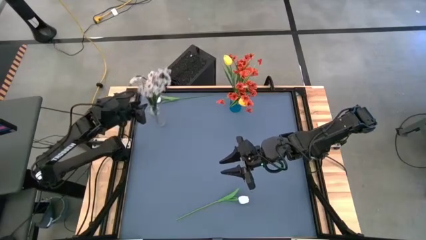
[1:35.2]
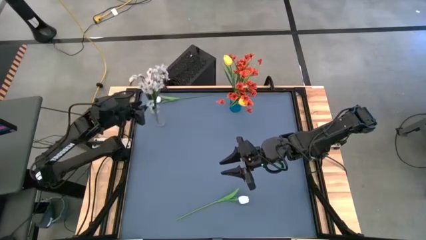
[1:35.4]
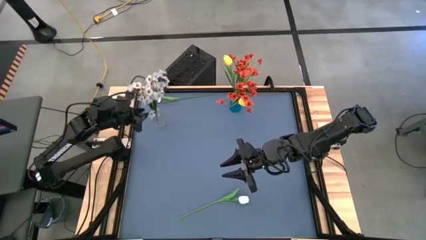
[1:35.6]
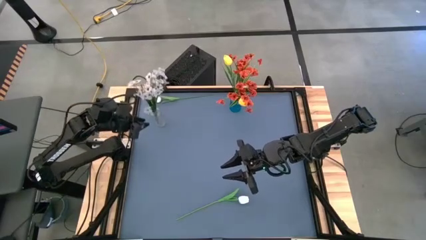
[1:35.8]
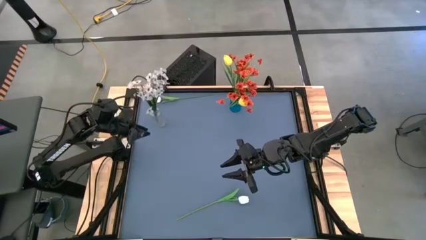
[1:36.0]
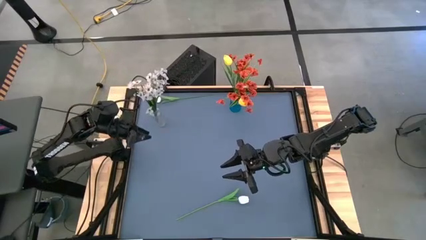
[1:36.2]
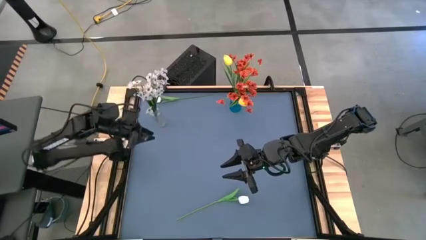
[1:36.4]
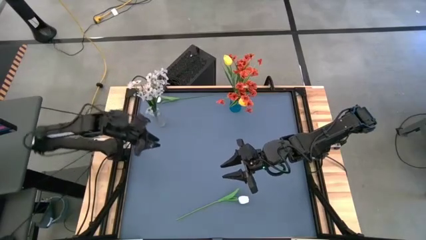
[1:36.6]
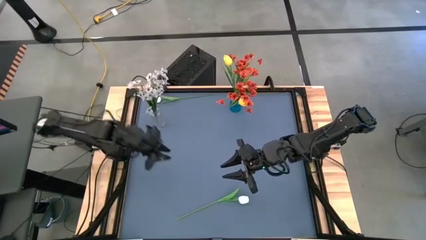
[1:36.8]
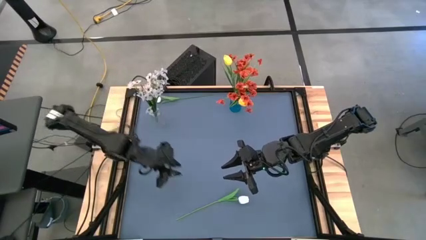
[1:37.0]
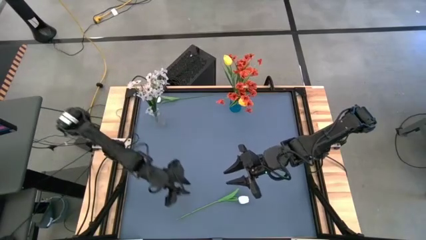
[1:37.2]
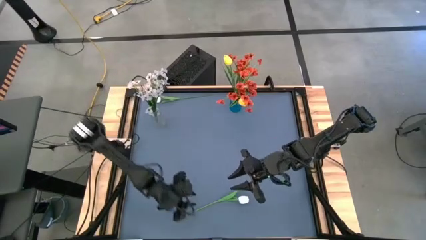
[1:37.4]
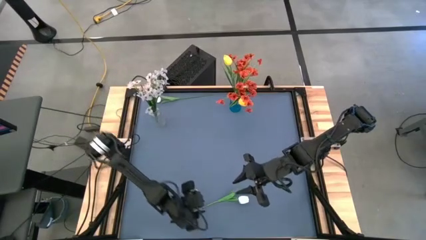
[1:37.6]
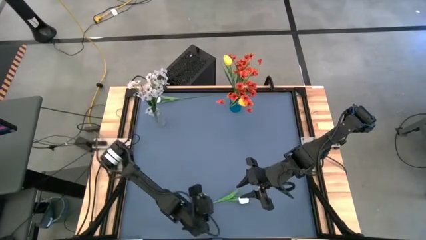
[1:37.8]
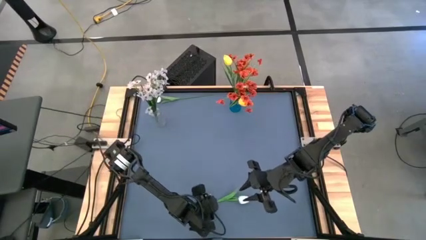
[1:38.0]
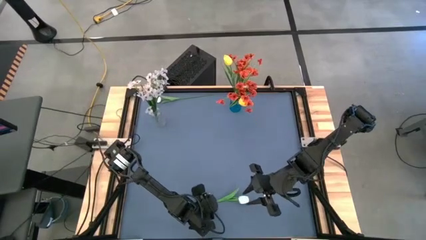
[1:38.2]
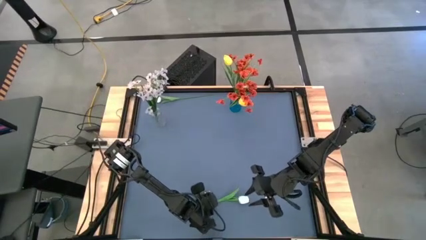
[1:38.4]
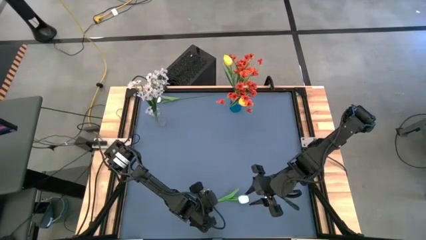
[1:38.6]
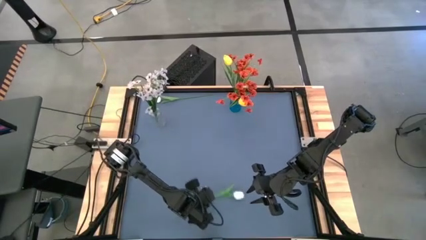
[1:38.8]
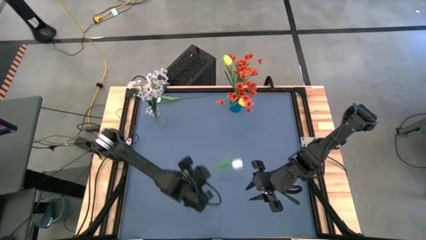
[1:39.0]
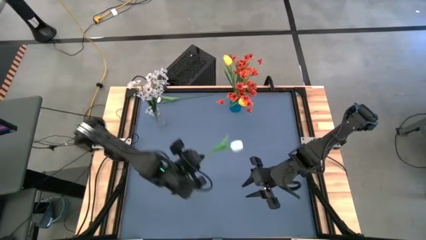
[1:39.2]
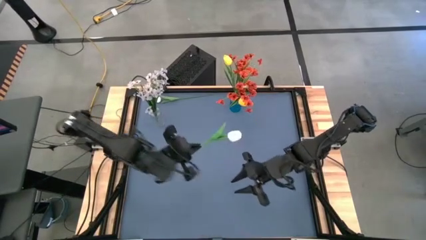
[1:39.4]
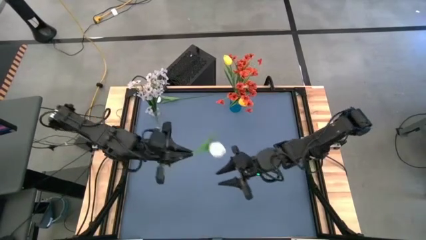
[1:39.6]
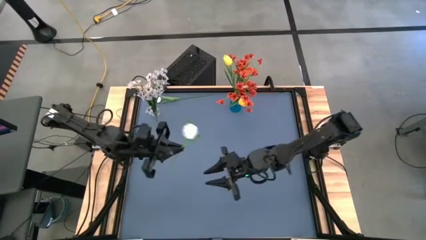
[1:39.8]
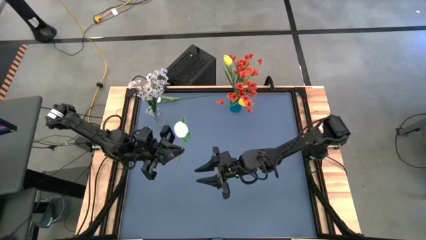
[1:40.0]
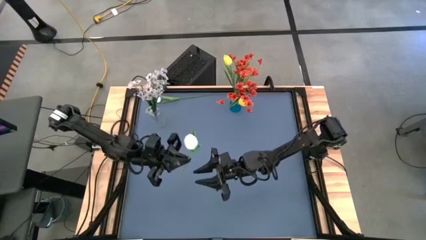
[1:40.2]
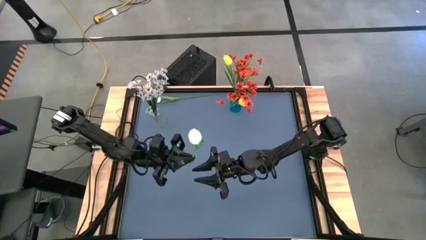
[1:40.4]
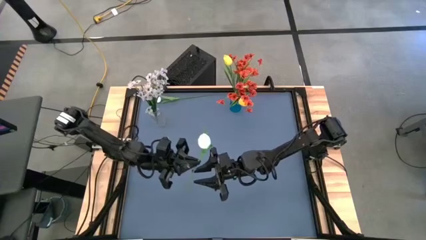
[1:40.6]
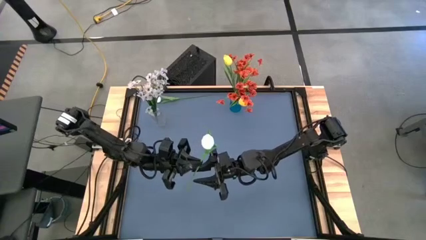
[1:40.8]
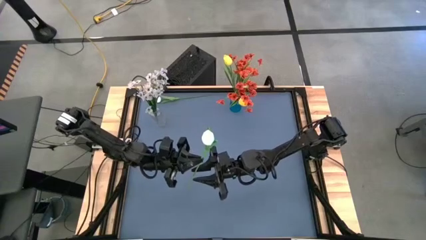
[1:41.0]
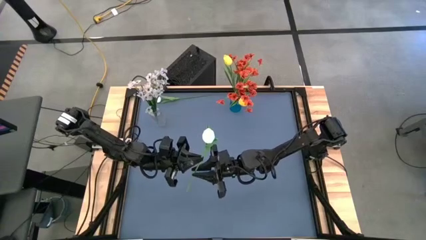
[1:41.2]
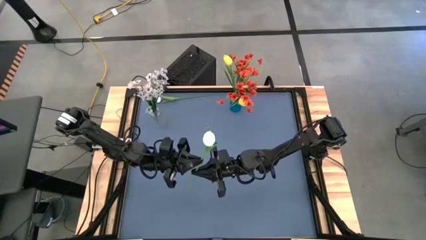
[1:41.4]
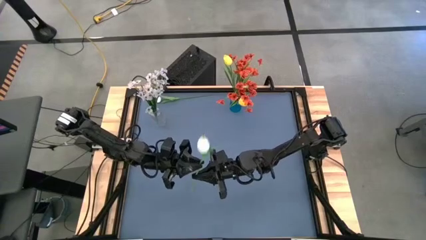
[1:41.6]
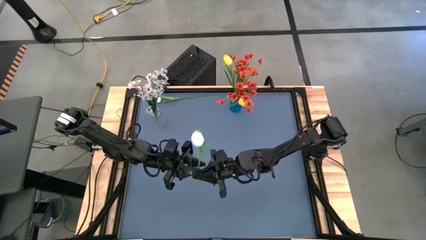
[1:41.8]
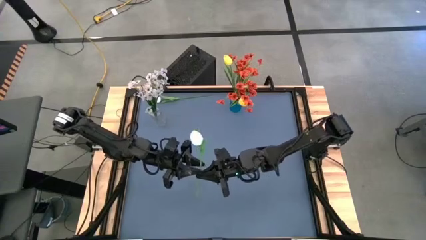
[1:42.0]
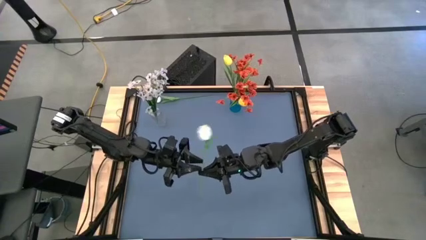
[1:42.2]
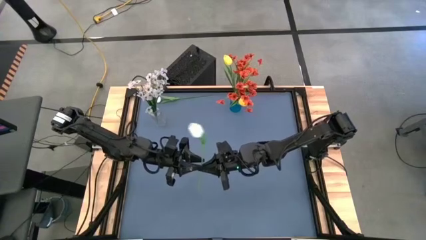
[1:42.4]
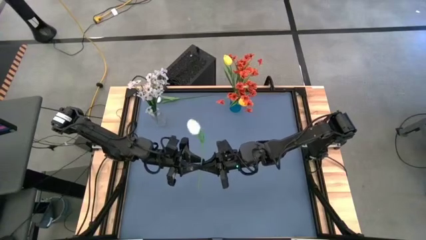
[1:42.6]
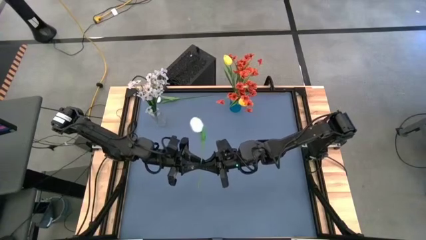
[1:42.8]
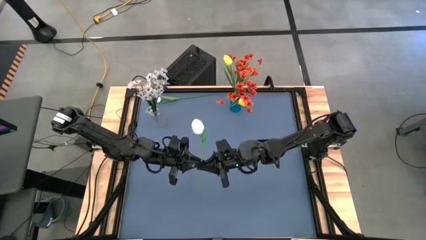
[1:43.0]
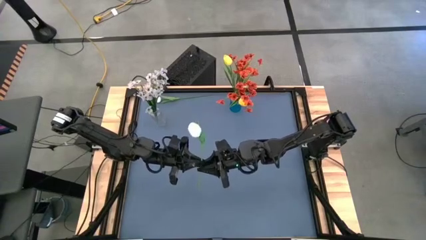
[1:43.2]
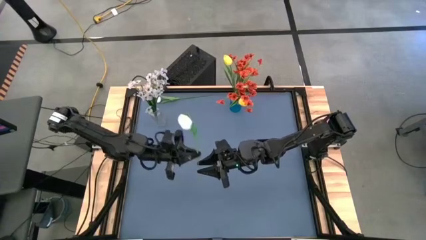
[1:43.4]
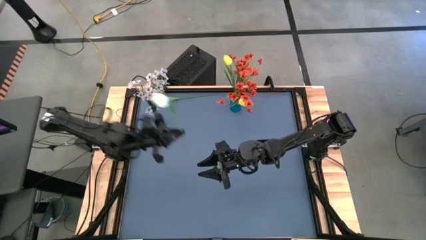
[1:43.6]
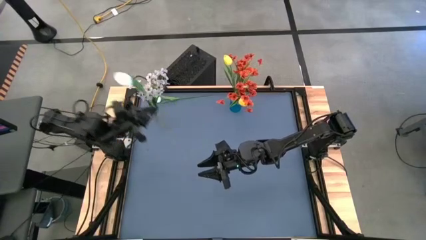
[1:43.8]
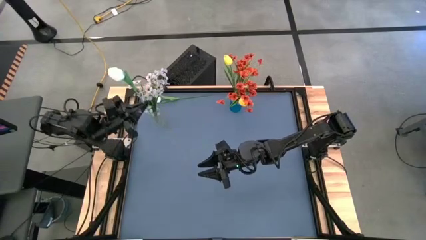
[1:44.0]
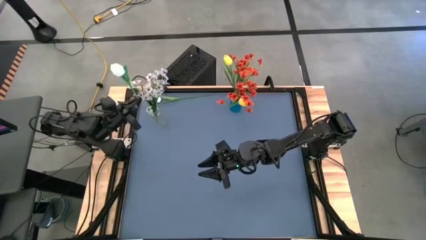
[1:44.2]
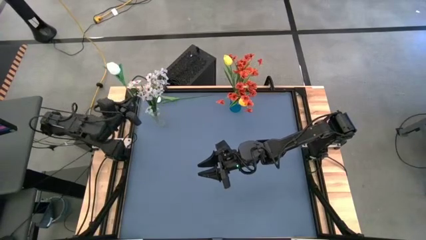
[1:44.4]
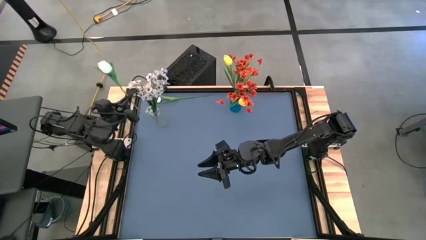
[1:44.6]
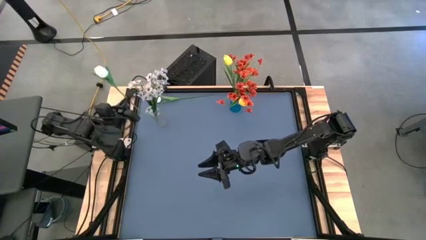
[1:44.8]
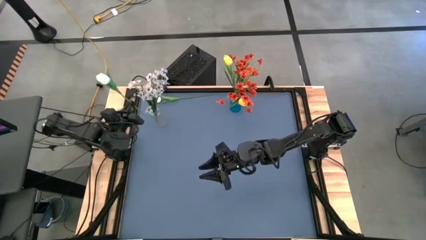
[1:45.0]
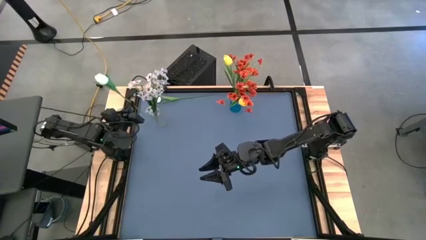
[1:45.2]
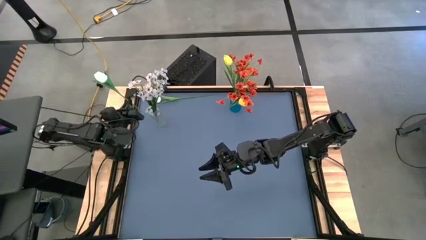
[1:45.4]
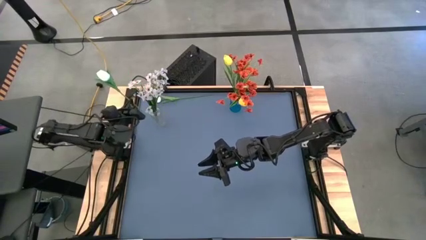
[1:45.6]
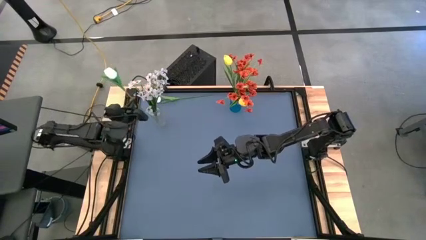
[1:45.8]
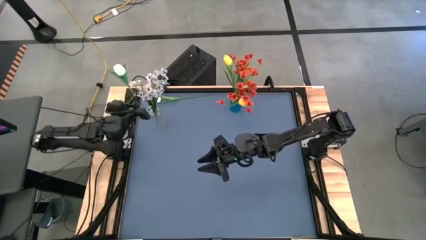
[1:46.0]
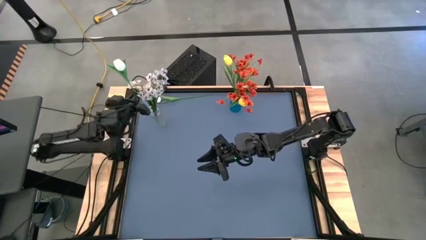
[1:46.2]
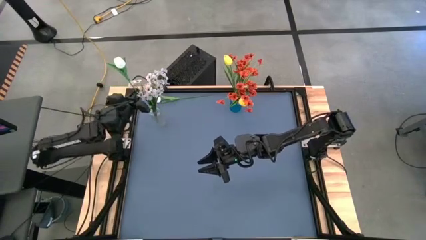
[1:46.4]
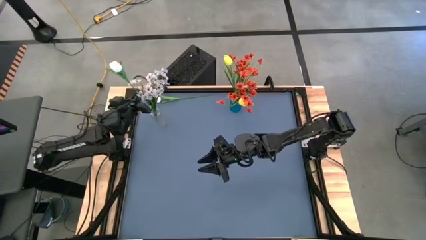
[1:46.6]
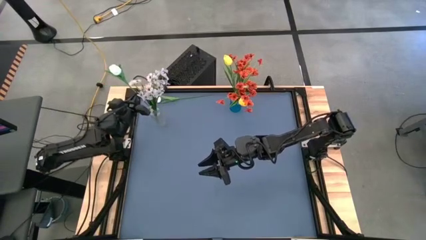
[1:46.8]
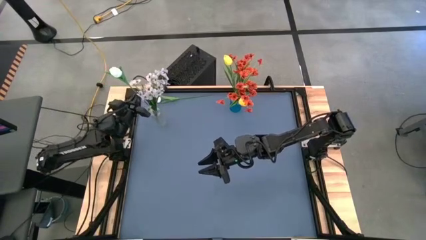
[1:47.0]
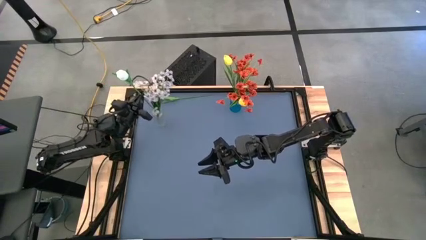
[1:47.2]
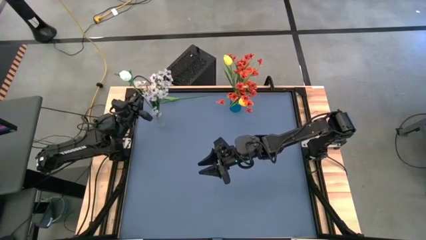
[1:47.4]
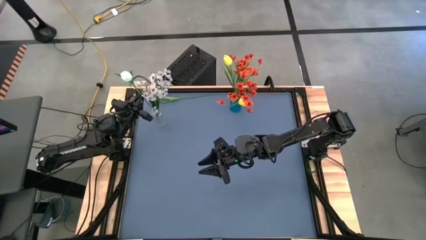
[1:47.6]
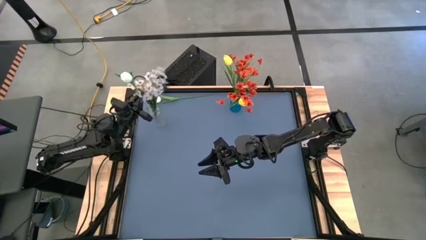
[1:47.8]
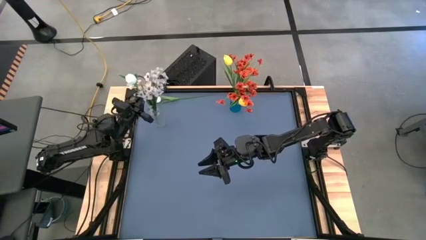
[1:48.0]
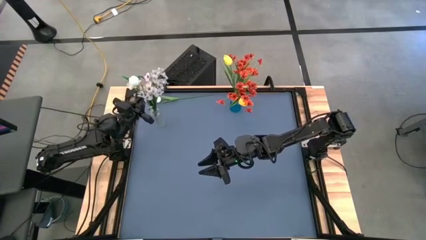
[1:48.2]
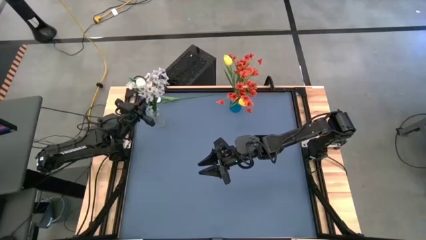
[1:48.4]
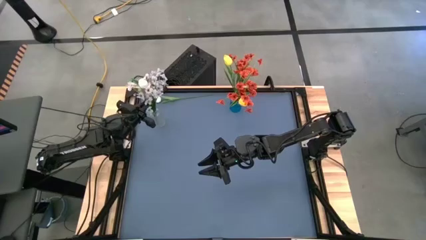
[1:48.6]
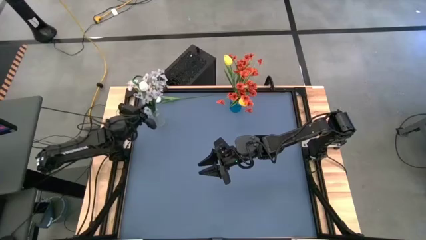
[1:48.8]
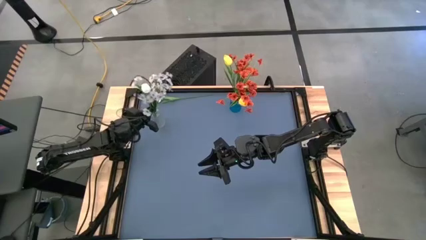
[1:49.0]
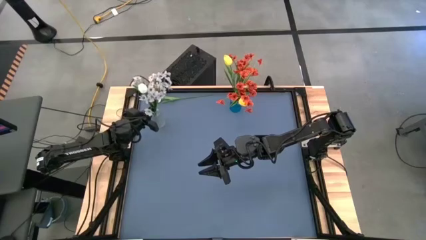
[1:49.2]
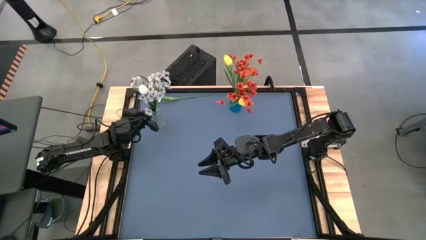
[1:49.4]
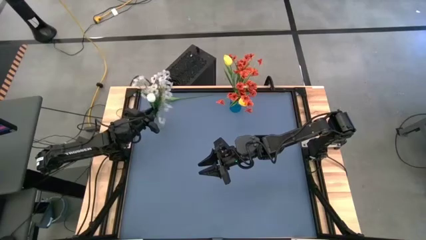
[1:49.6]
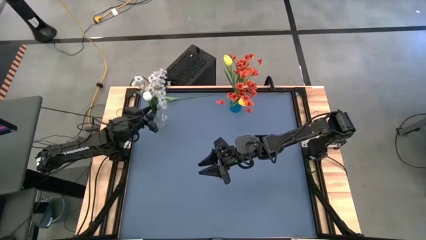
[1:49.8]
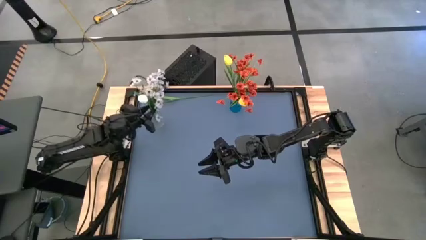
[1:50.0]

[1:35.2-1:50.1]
Task: Sort flowers into vase by color
Put the bottom white tulip into the transparent vase

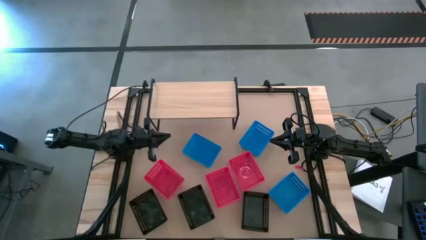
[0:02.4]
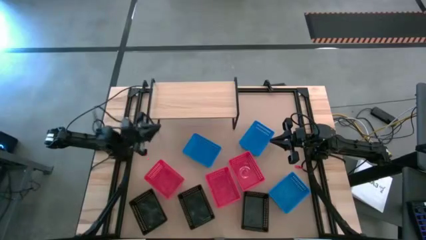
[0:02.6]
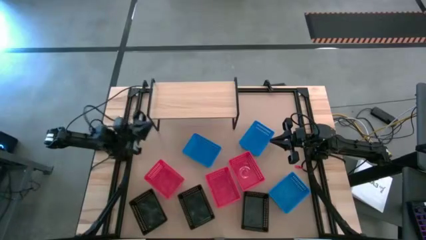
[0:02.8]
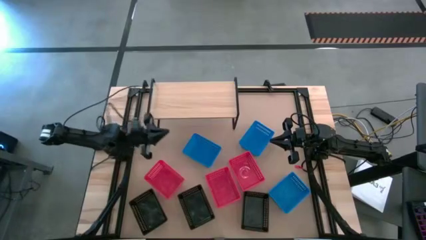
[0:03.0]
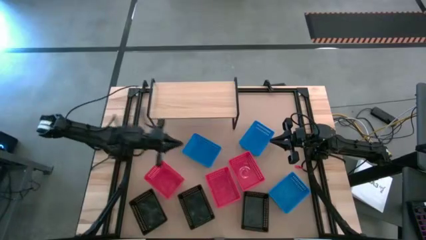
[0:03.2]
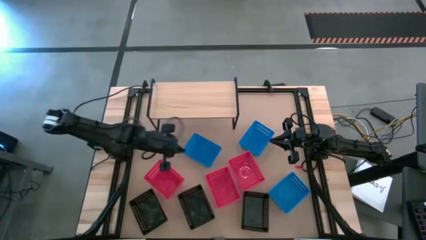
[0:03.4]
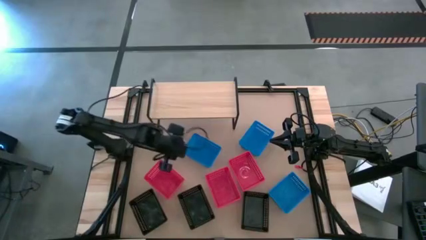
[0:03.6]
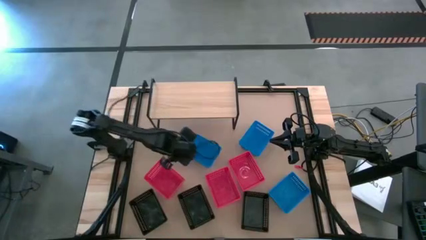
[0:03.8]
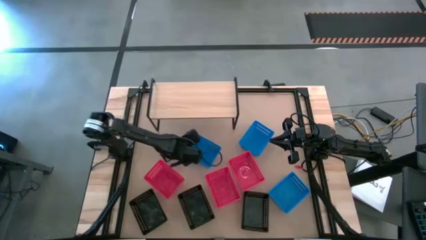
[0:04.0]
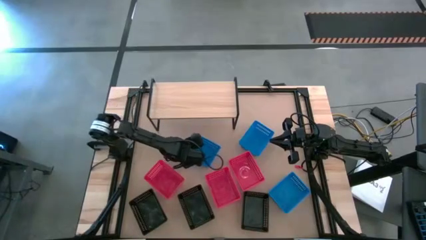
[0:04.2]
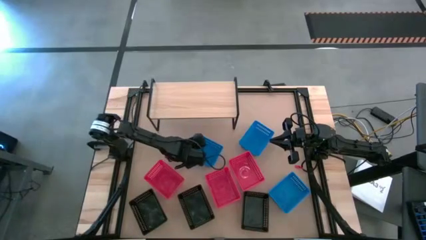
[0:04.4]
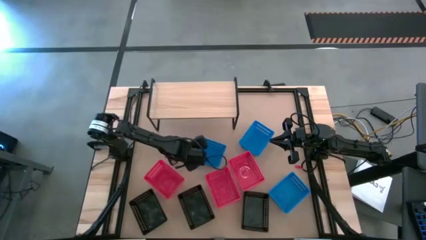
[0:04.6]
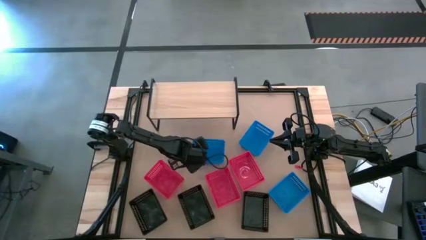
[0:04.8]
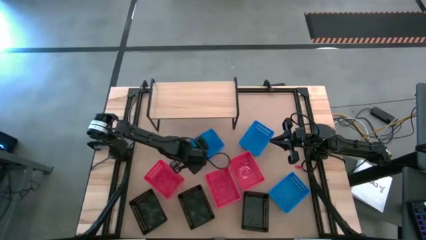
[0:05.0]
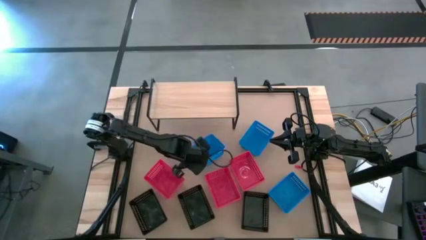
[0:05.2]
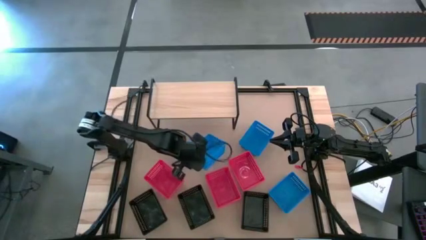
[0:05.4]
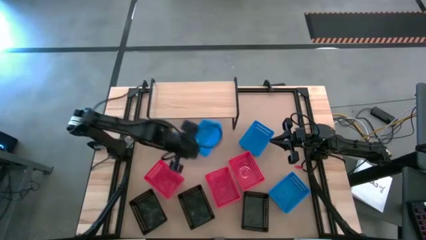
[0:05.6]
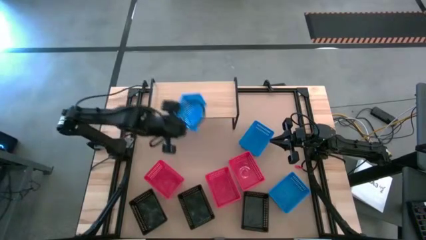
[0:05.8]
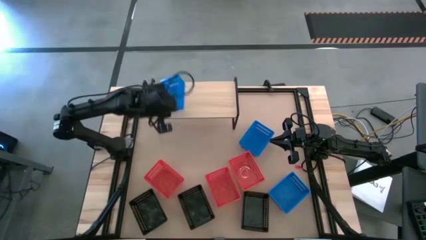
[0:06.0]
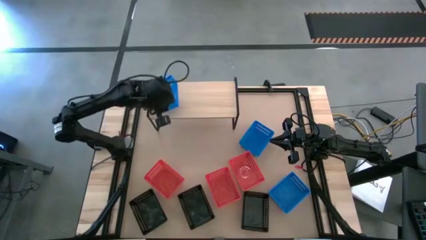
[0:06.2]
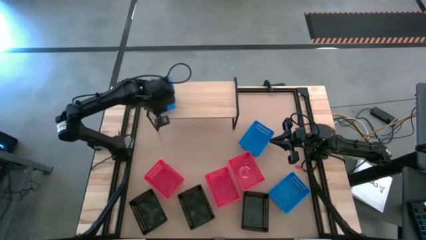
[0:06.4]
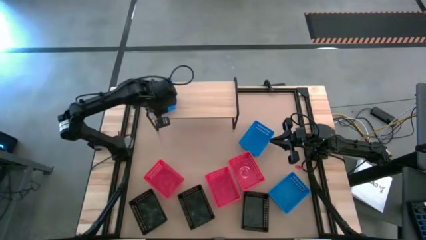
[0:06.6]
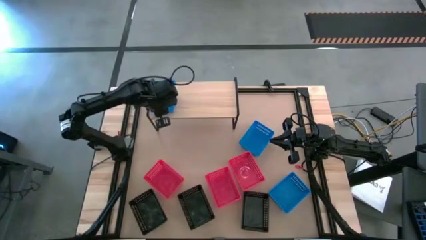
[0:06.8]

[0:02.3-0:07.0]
Task: Stack baskets on shelf by color
Put the left blue bin on the shelf
